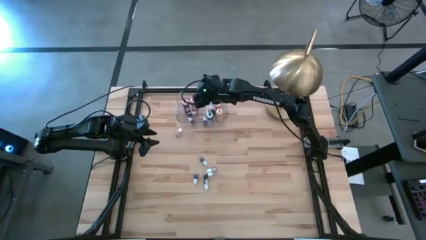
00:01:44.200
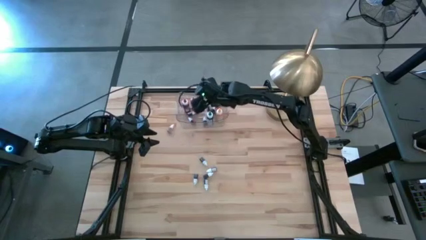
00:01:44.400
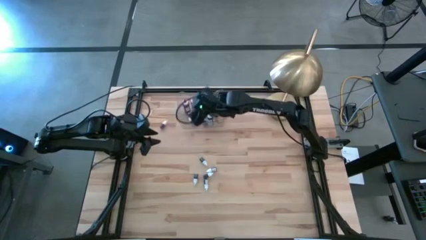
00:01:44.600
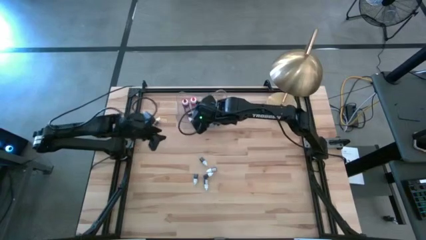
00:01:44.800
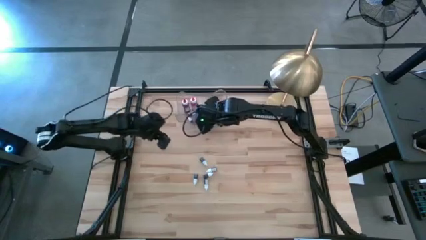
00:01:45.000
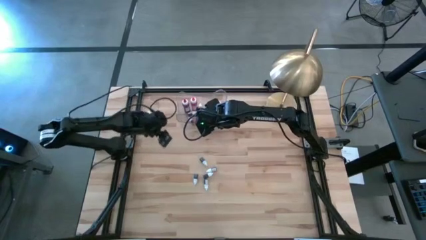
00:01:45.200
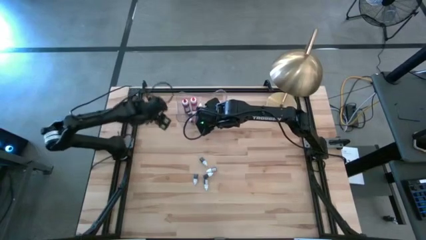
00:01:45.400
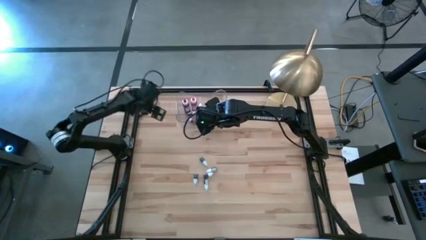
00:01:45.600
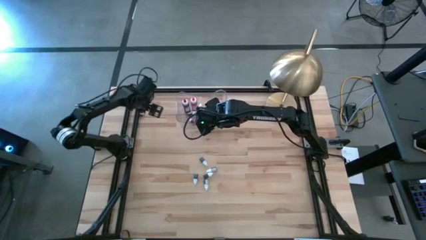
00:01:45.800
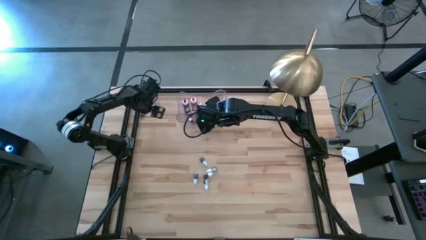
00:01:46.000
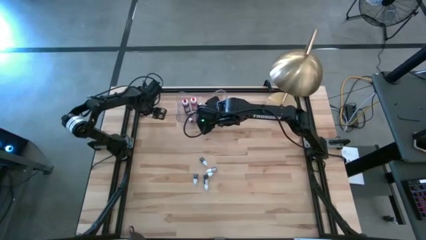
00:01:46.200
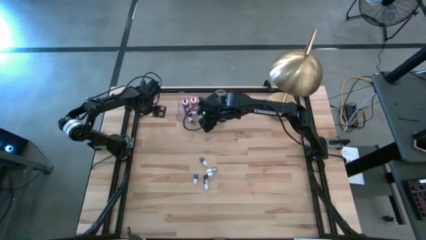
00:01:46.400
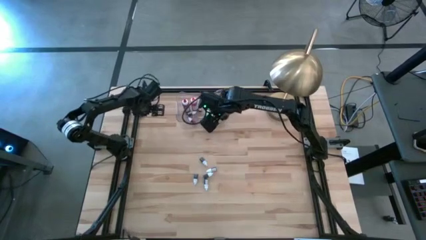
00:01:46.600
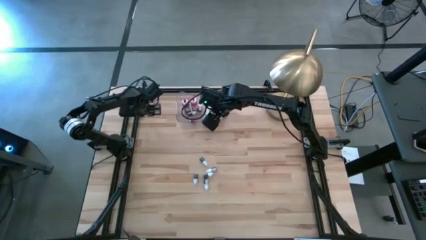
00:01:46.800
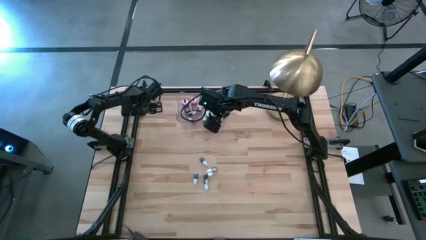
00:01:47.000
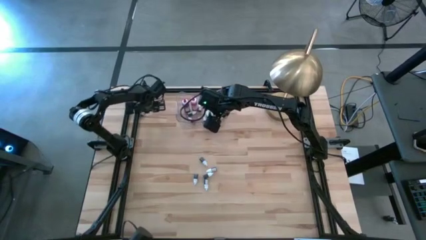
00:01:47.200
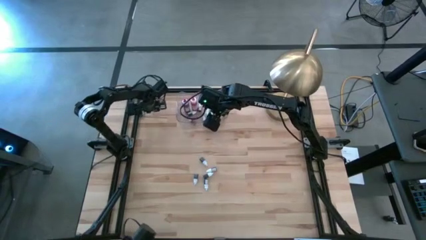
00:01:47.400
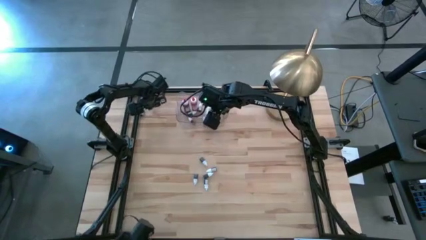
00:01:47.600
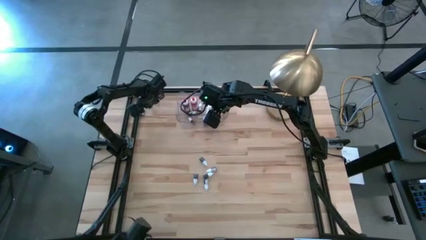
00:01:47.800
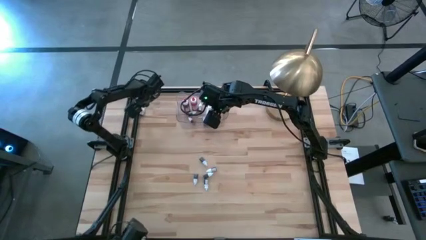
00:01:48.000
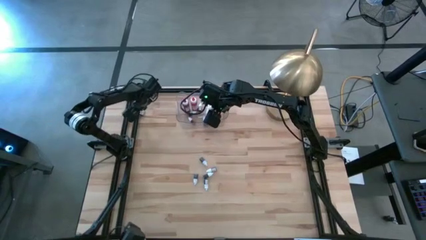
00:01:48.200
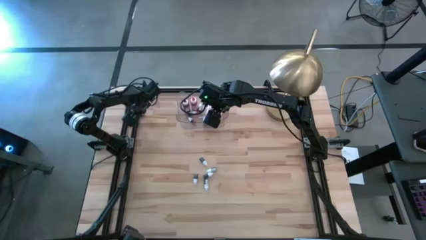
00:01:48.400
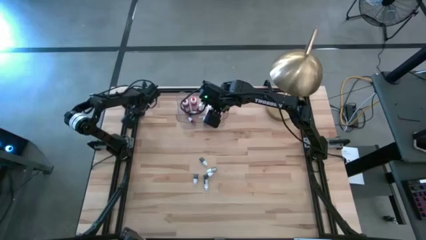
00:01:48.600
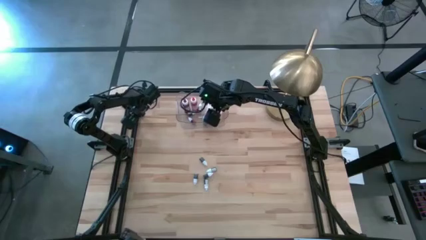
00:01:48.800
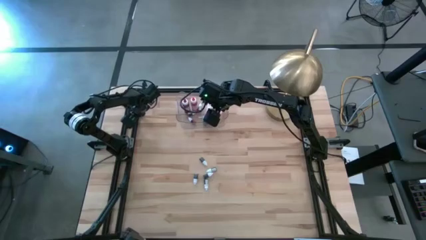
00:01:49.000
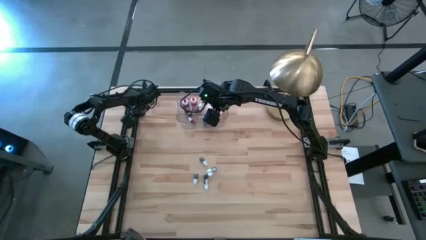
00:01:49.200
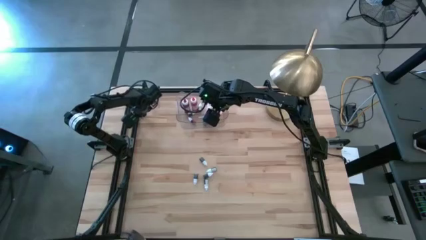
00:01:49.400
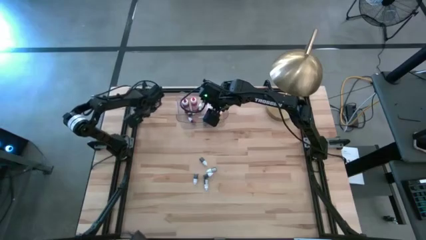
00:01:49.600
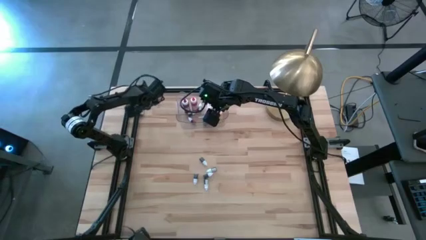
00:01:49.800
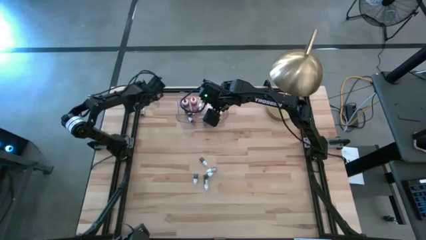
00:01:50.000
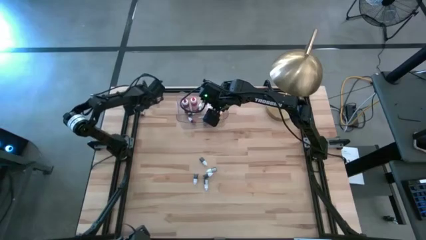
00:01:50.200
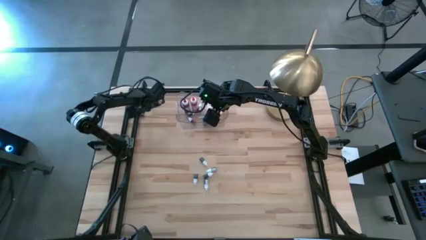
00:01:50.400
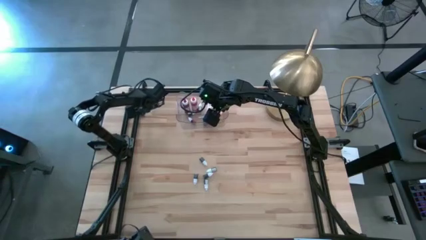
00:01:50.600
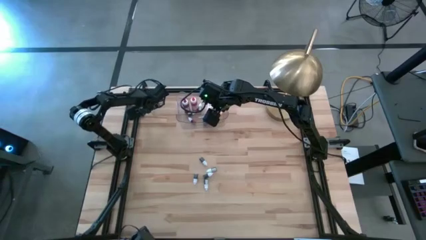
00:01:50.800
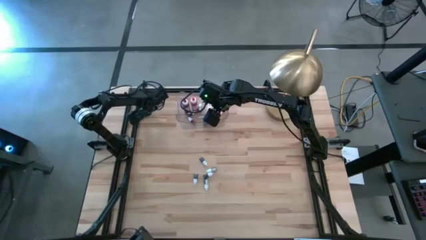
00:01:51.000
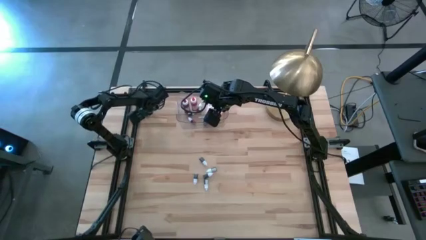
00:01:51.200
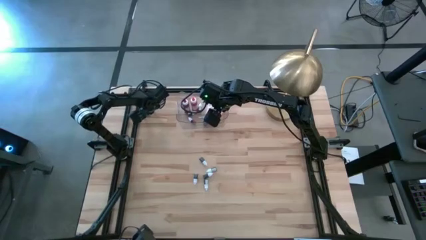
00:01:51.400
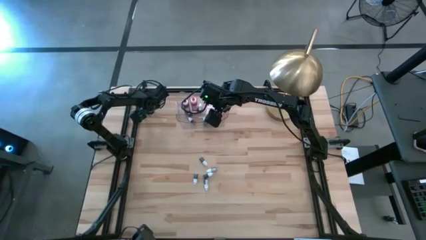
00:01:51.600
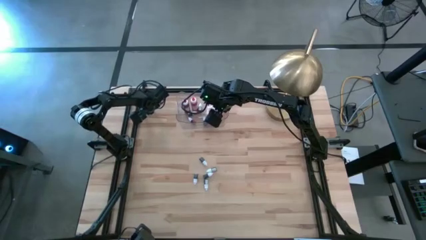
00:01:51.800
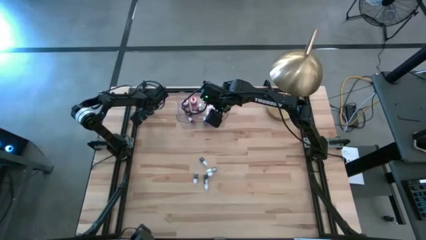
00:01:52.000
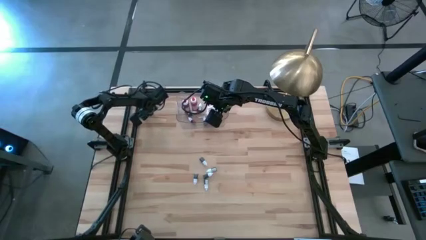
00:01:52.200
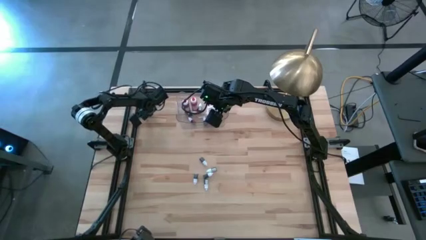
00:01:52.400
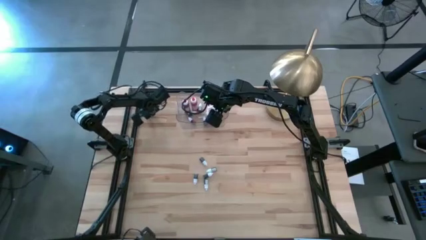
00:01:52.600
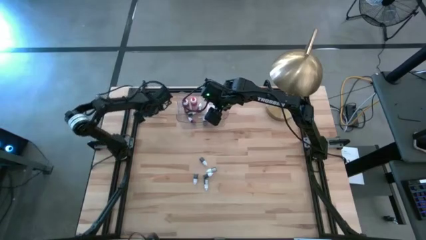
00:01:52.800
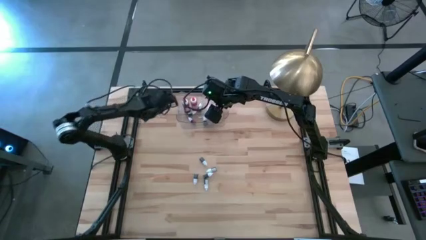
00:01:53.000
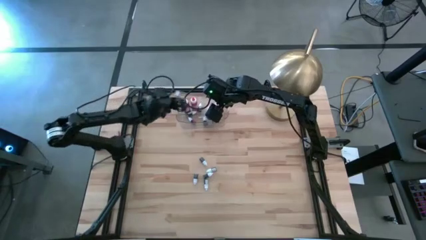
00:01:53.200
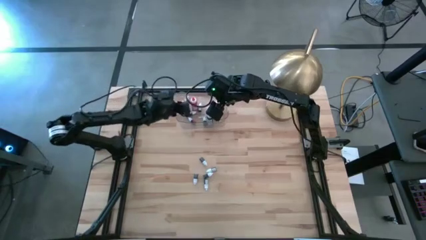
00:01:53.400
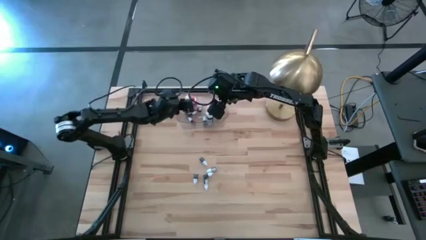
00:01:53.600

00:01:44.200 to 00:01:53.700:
Task: Pick & Place food coloring
Put the small orange food coloring bottle into the transparent bin

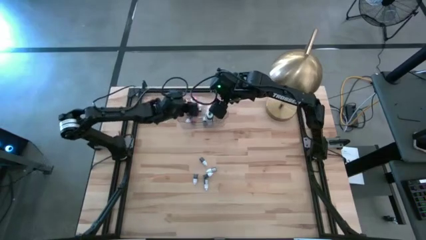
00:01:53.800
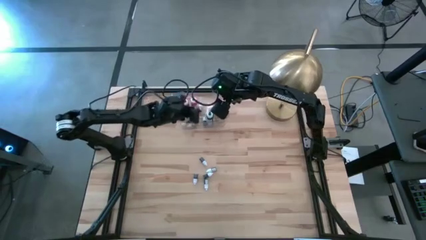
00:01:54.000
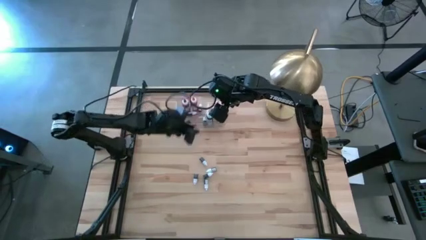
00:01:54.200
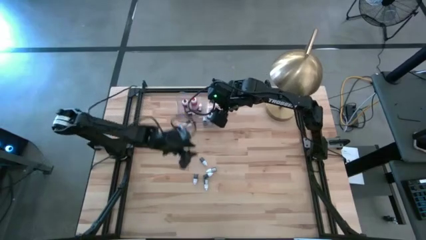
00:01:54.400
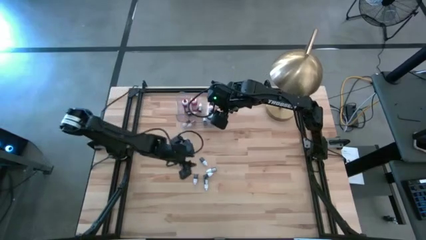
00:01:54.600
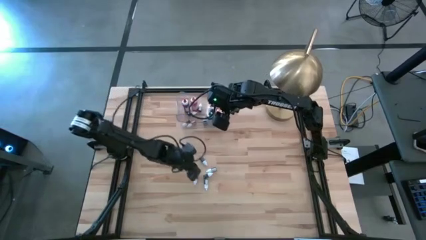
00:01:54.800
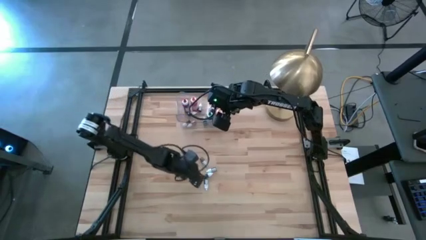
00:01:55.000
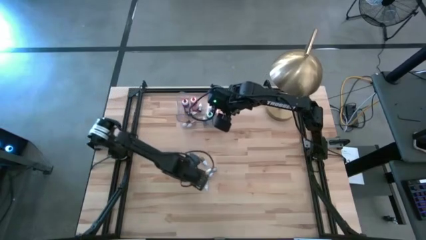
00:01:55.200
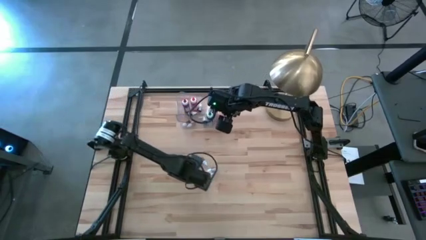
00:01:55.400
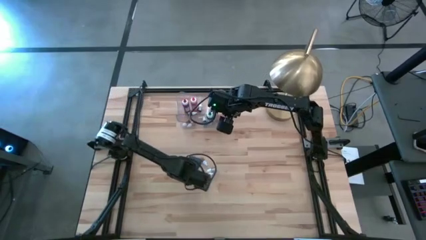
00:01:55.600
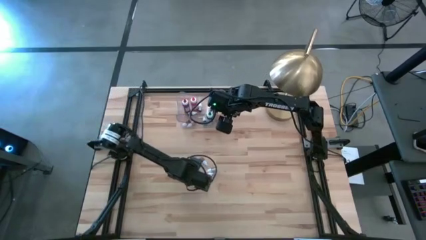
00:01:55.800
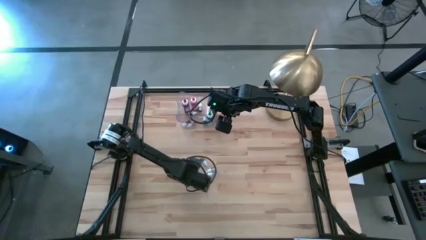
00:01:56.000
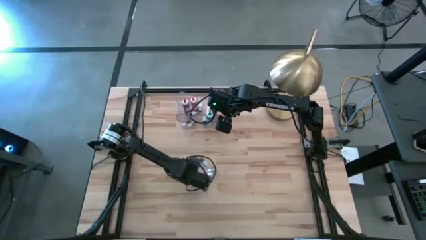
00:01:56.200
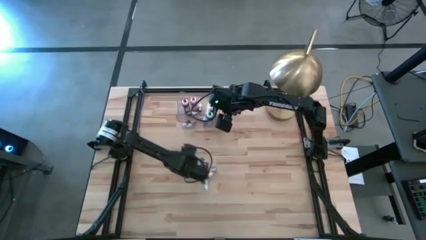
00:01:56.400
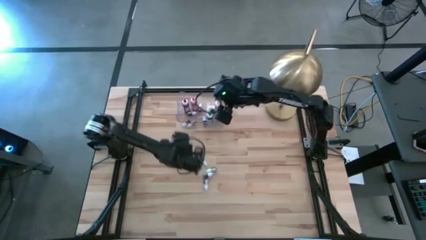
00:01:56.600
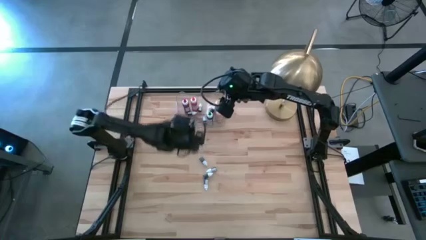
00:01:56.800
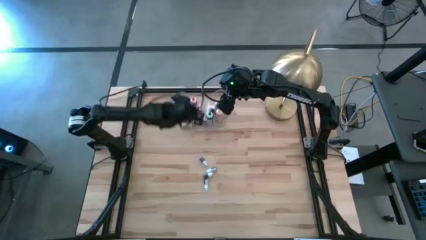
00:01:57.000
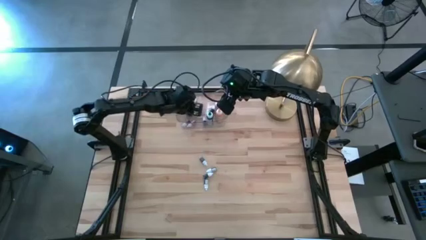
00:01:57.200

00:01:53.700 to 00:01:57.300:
Put the small dark green food coloring bottle into the transparent bin

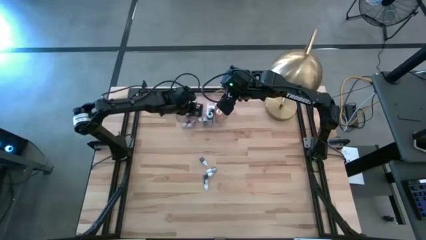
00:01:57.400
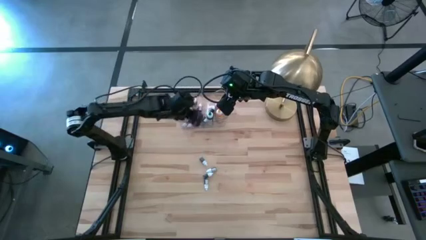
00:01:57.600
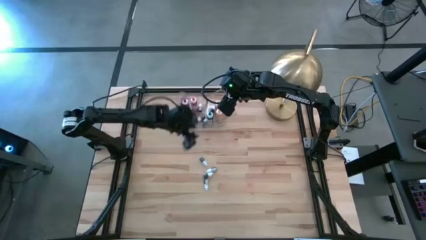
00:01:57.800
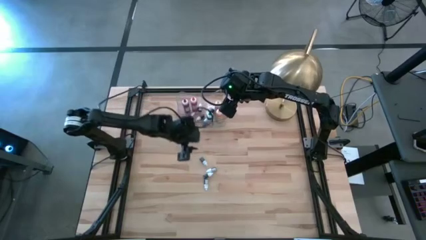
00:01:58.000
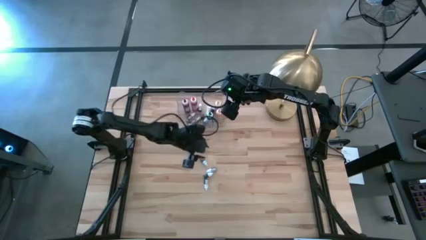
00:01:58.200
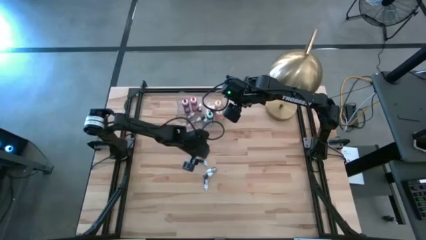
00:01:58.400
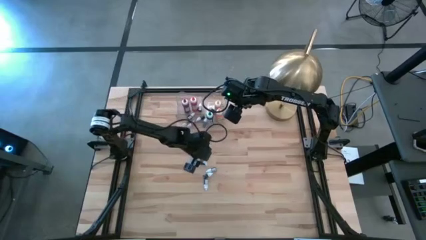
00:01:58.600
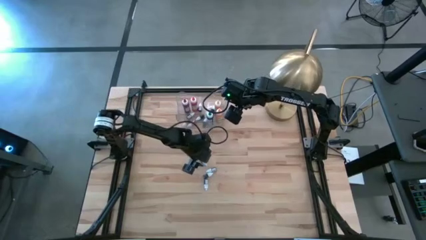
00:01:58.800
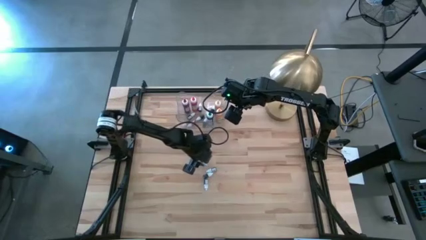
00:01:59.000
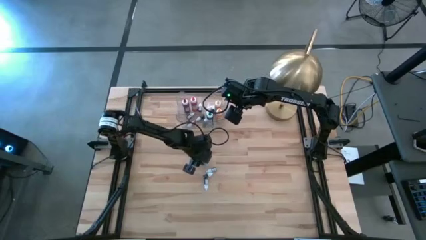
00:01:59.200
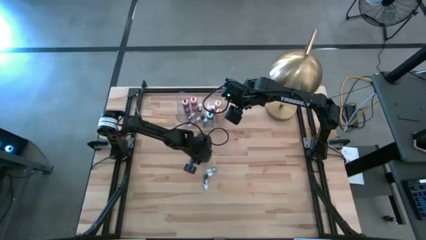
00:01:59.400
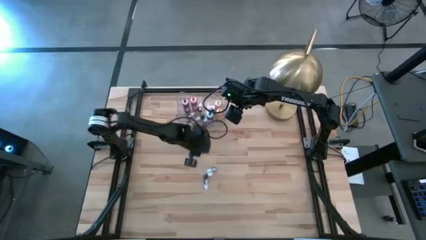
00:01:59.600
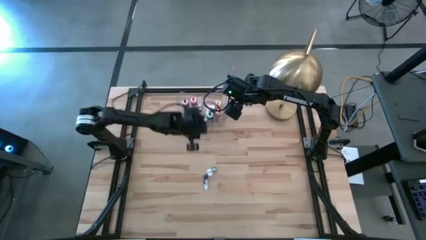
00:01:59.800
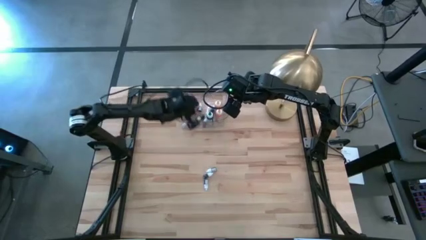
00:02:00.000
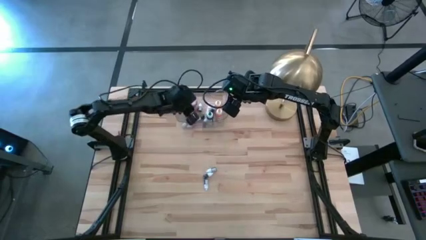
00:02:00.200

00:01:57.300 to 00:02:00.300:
Put the small blue food coloring bottle into the transparent bin
